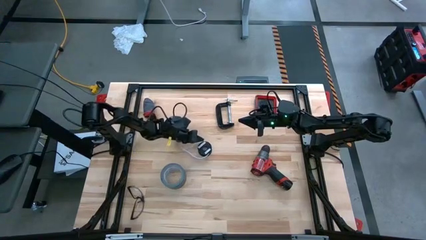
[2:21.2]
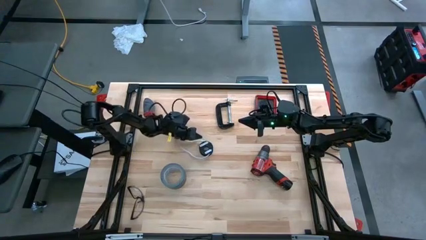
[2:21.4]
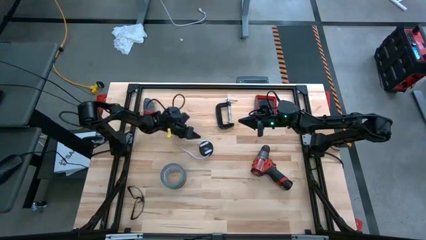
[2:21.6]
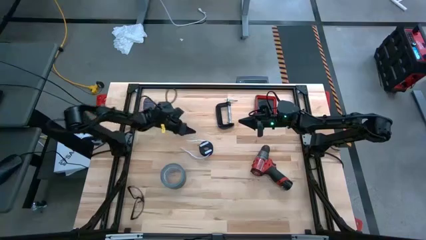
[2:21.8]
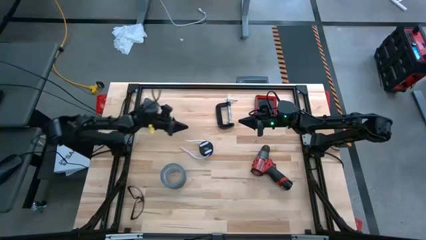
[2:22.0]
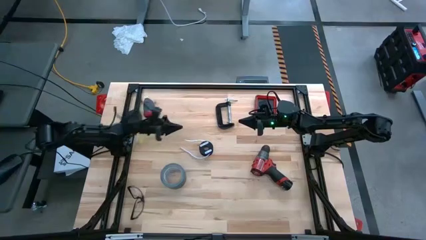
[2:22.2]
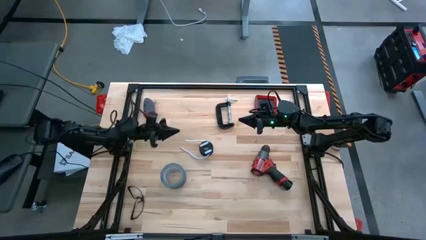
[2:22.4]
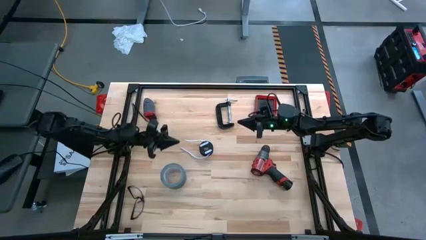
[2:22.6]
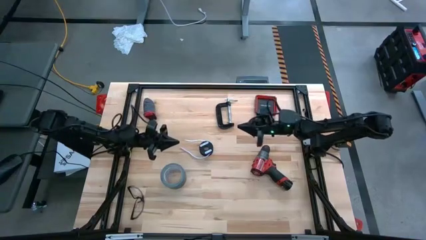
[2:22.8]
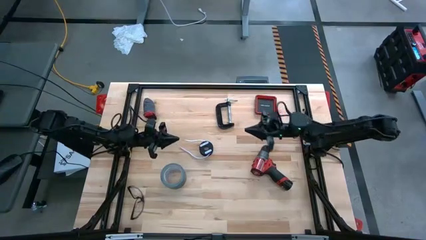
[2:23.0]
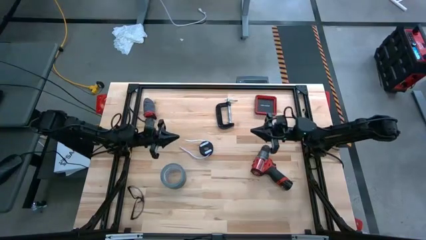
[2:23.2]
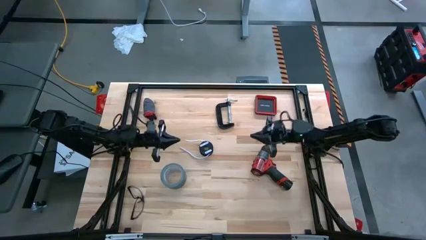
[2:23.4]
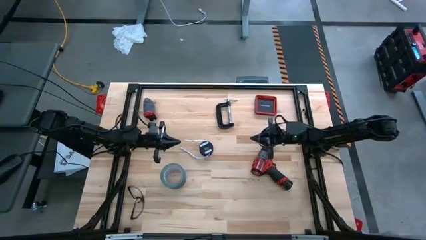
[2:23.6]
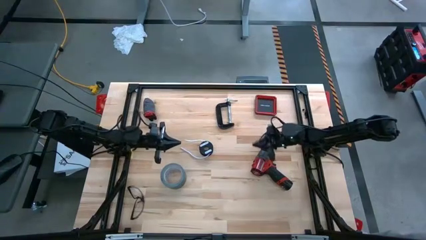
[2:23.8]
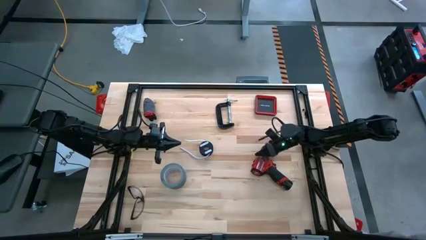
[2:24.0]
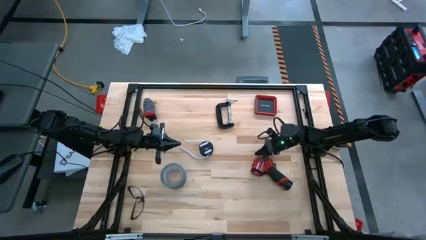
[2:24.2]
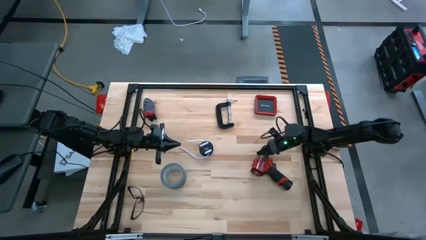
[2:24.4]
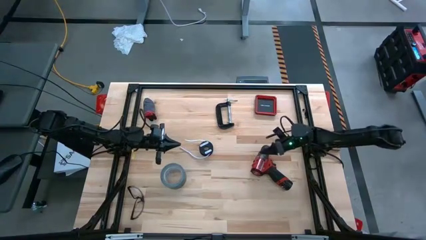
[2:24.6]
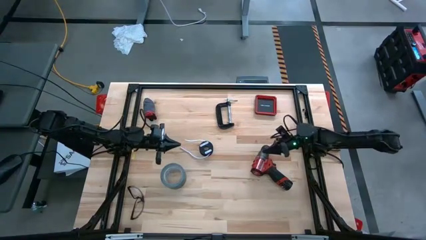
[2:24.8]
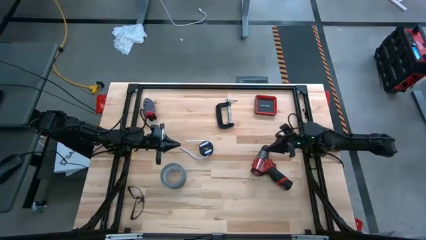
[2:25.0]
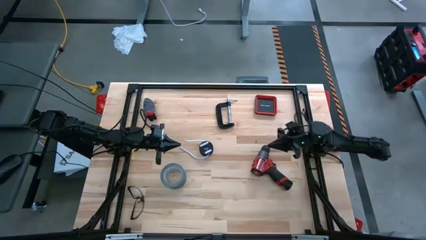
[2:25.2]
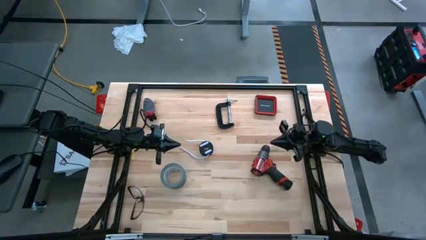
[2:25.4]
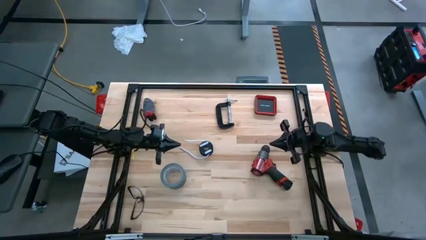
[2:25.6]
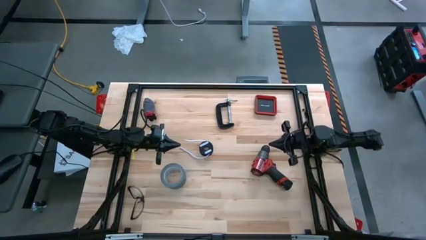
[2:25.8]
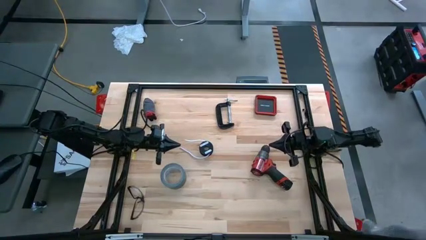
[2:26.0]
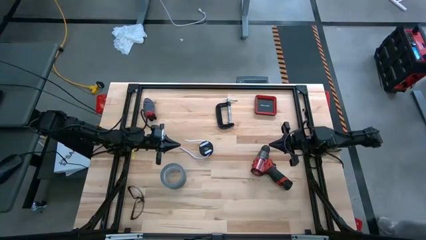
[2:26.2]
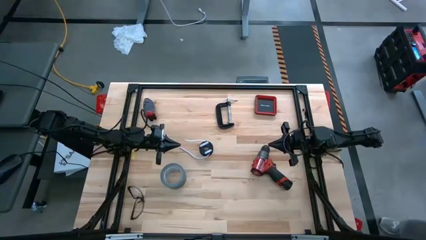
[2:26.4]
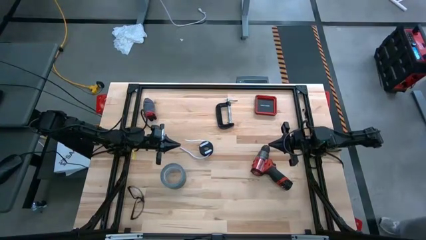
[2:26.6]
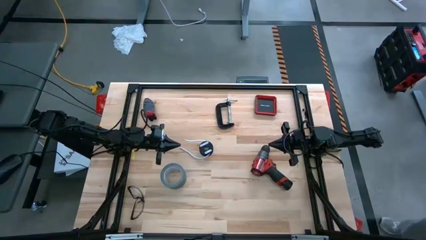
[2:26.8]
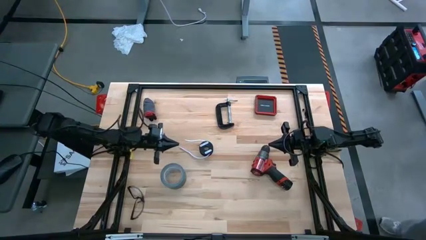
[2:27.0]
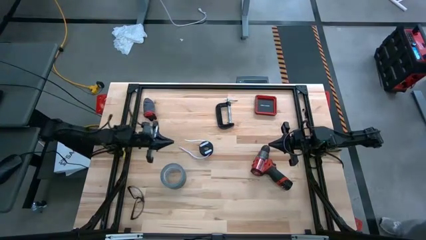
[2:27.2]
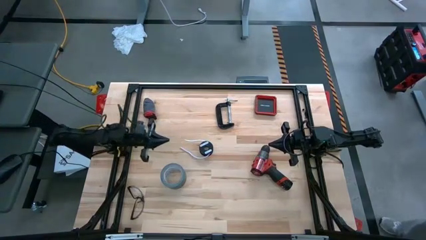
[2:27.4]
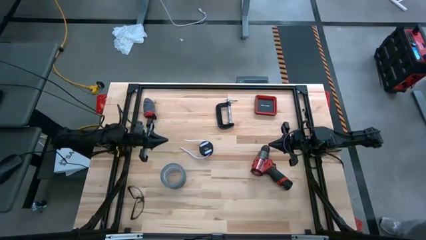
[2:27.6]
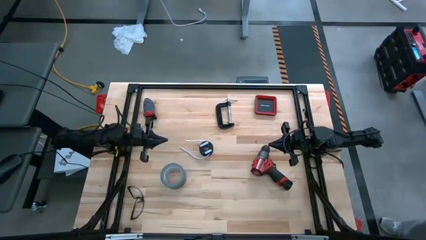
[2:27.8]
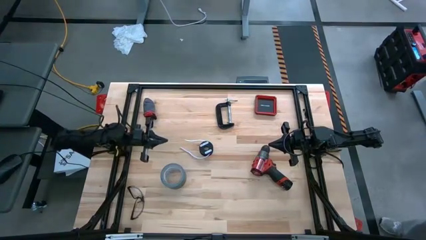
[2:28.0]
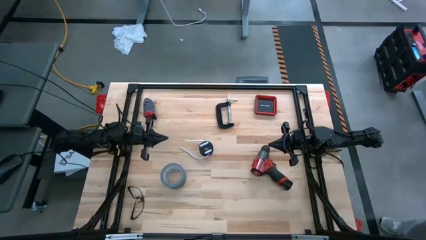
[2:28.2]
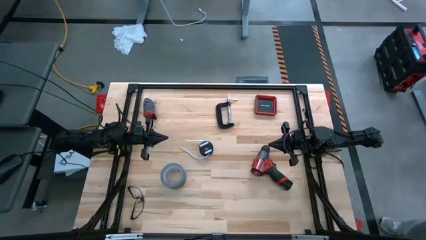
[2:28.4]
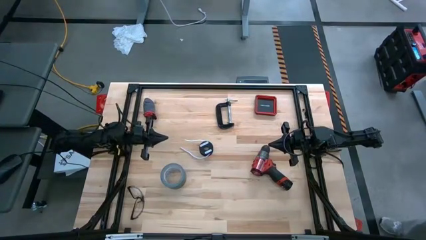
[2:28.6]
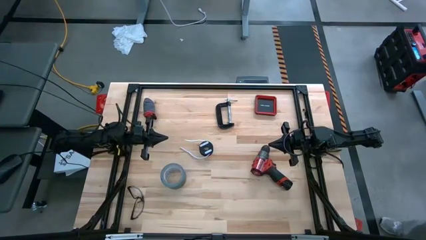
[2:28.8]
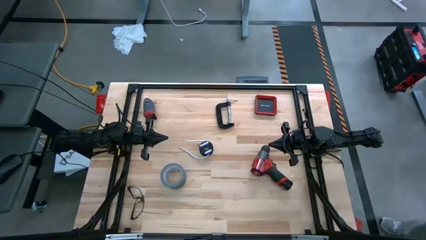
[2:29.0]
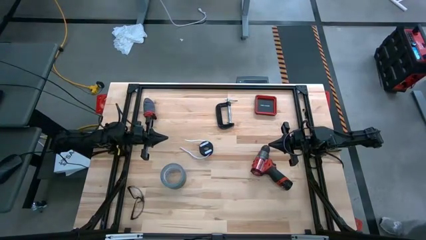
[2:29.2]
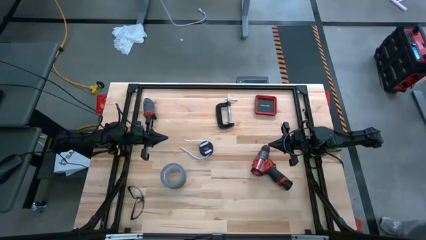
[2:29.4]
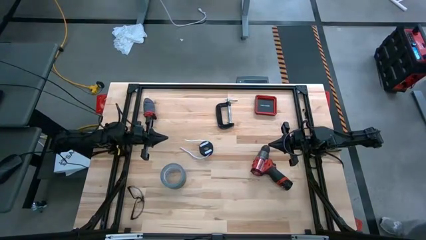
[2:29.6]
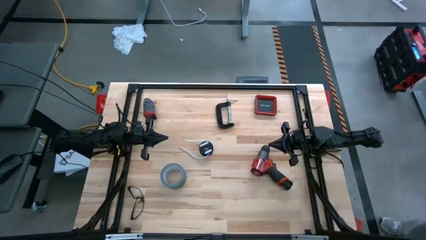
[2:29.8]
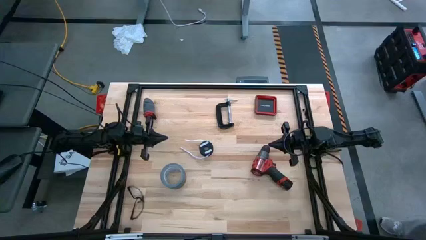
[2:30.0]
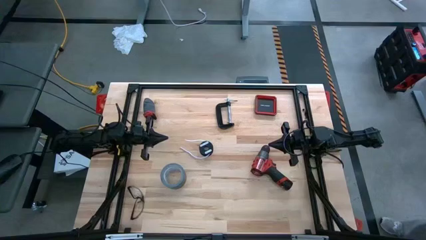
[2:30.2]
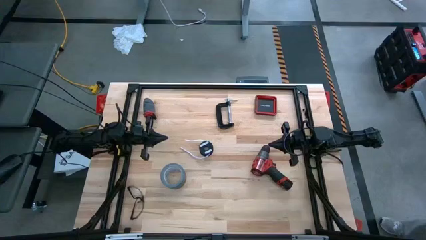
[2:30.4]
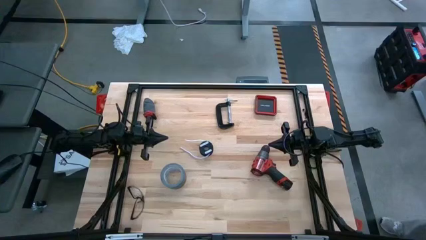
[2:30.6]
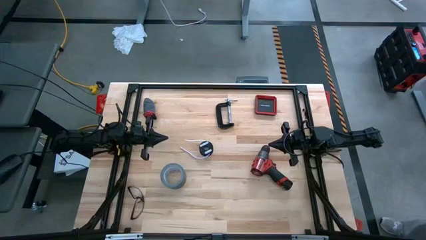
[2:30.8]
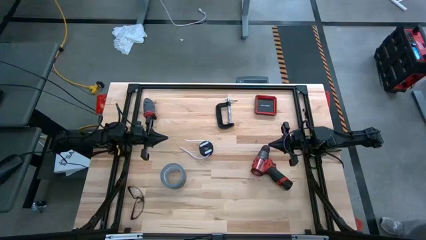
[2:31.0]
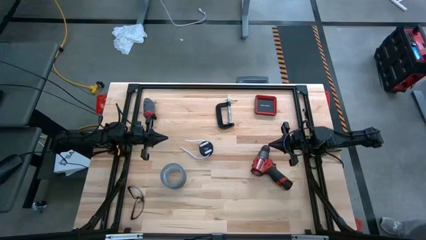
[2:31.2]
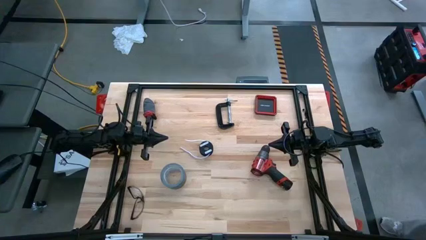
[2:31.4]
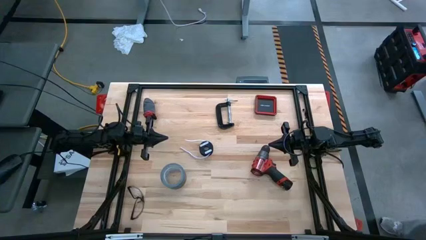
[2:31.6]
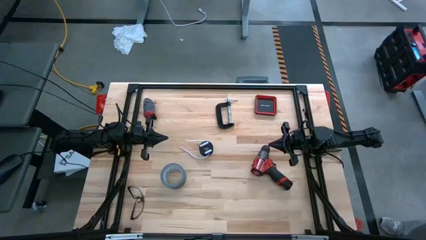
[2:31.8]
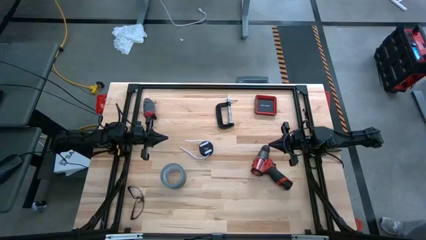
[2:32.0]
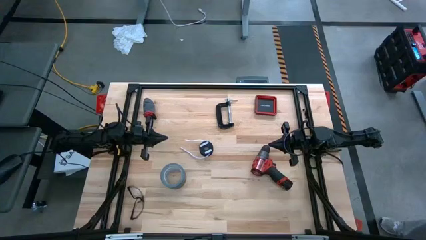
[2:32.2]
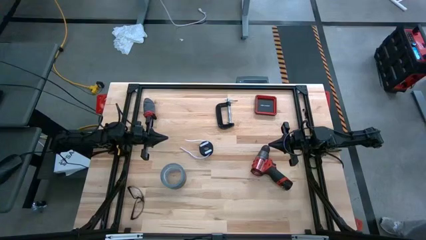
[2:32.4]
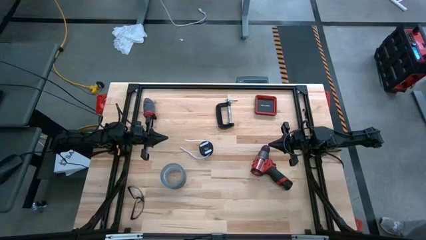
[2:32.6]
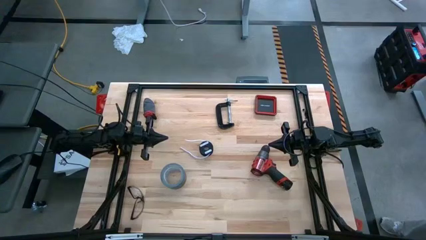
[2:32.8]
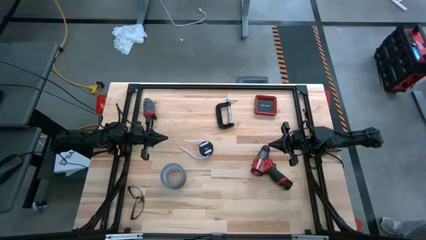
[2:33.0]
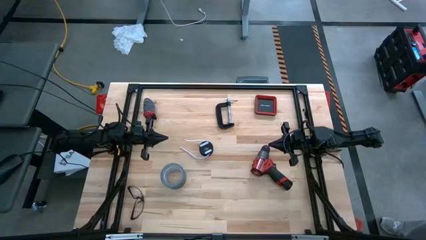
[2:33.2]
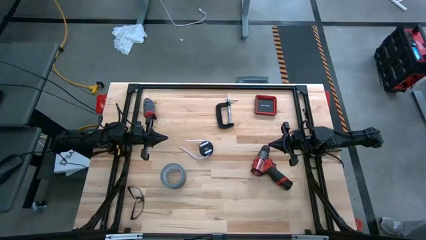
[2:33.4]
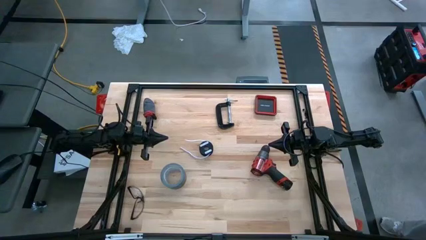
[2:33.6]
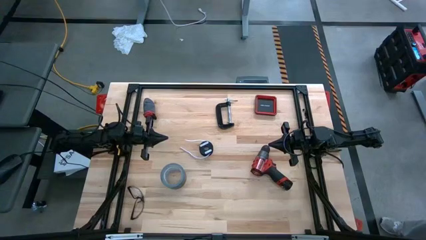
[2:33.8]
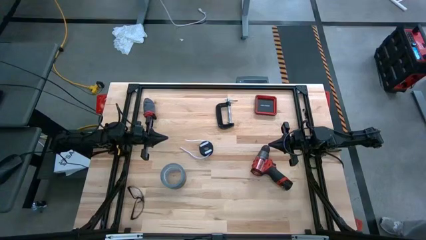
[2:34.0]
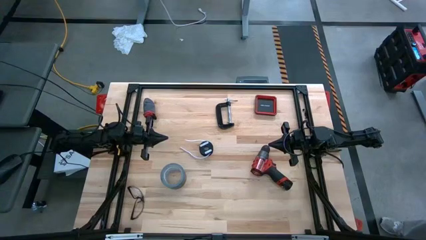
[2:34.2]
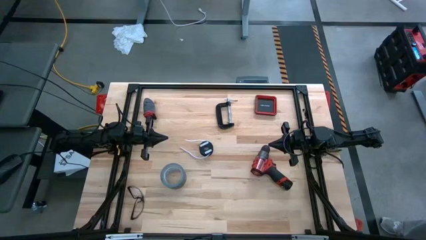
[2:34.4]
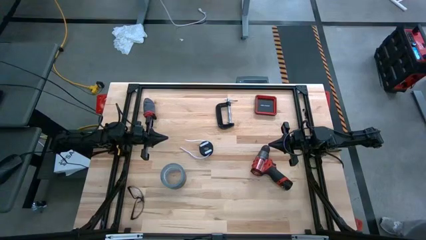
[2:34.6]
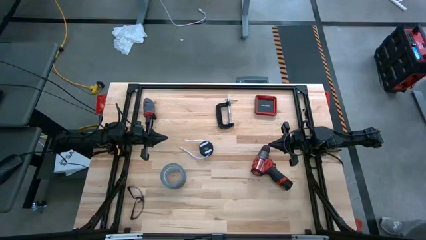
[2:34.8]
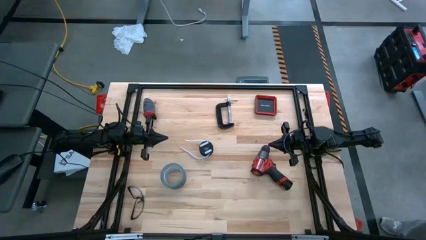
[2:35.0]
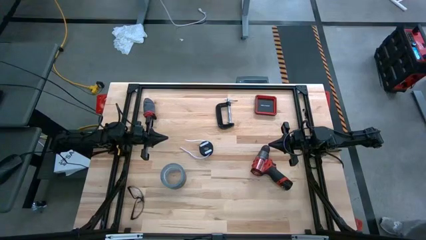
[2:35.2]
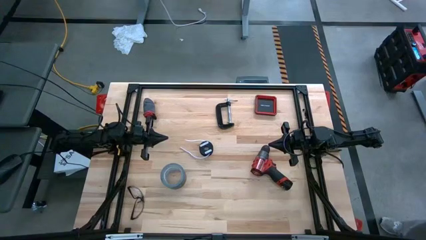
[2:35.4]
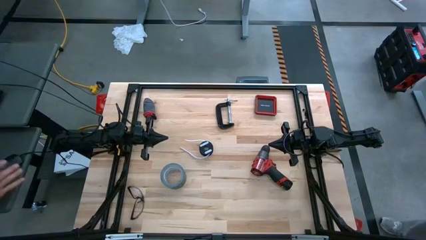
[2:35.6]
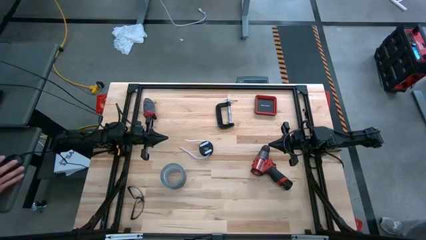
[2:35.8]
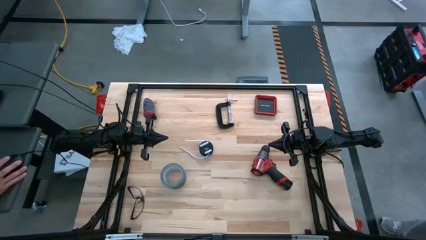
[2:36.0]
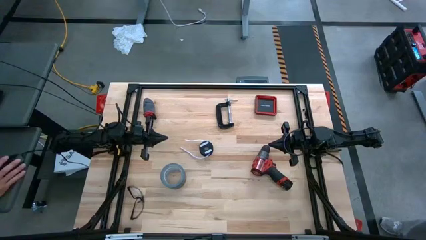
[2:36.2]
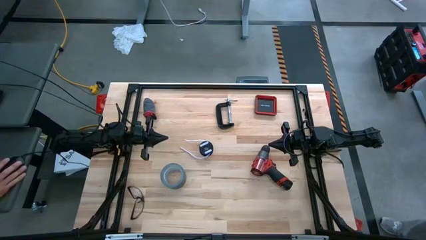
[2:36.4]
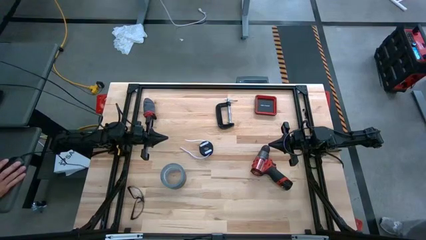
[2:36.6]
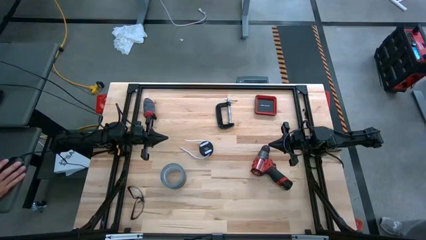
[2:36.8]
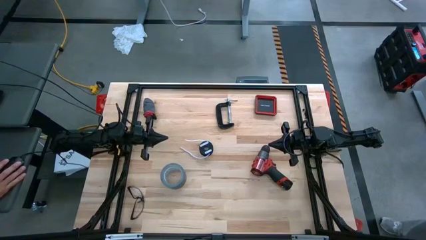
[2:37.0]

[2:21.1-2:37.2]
Task: Coil cords
Return to Home Position

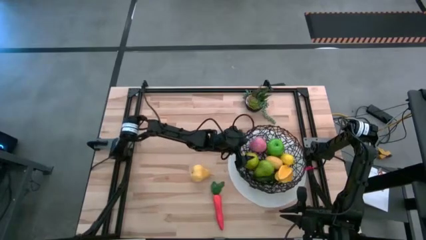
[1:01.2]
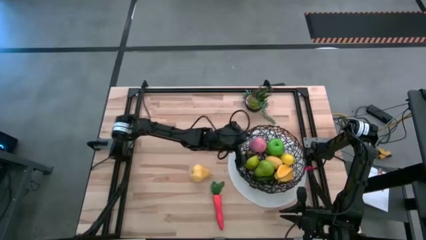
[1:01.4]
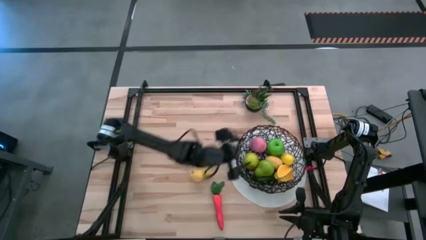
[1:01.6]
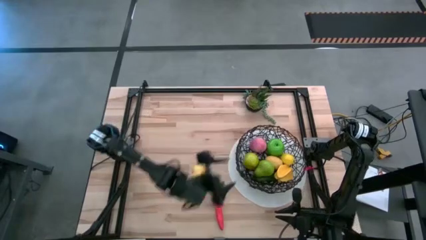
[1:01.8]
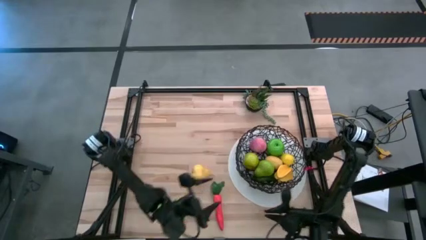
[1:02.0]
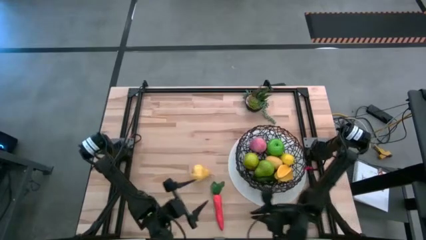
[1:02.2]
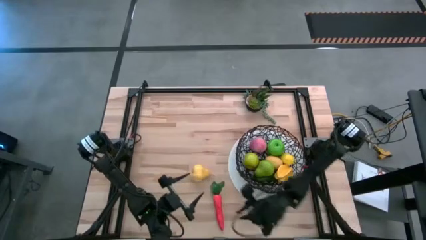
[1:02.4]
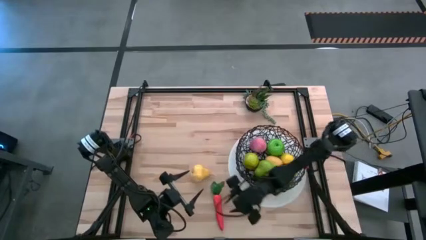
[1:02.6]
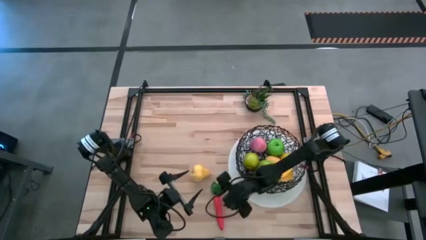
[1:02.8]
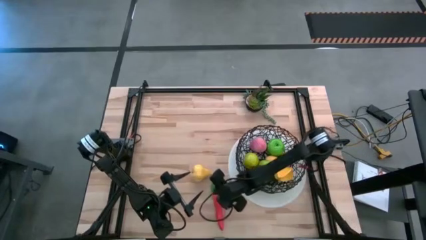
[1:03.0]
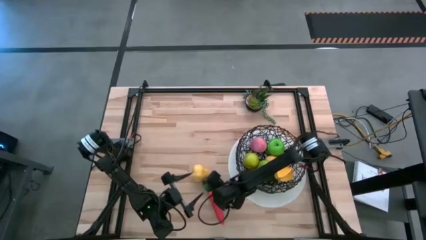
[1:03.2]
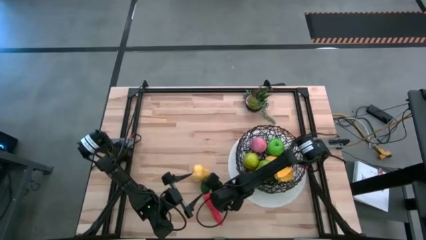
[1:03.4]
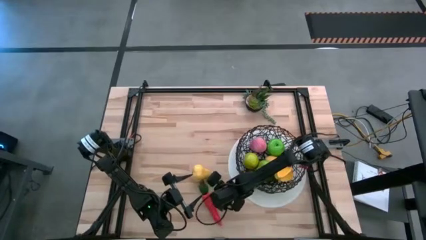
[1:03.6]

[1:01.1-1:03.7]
Task: Build produce basket
Put the carrot into the wire basket
